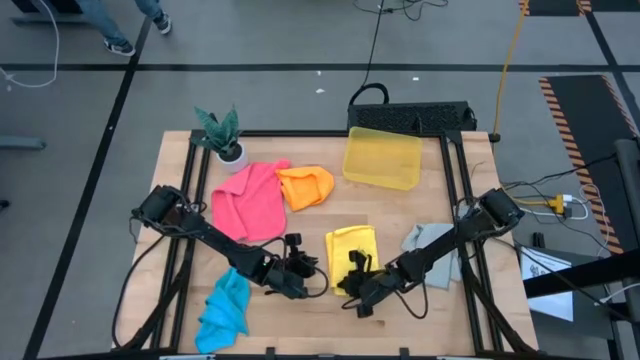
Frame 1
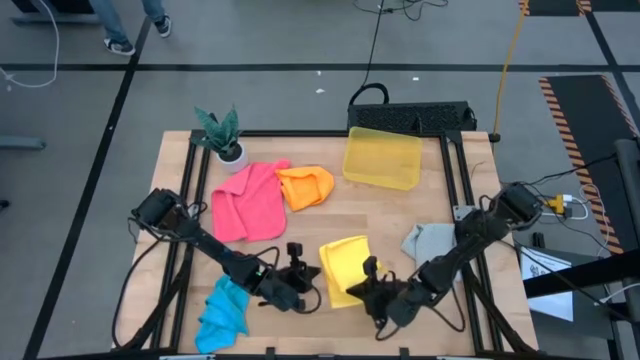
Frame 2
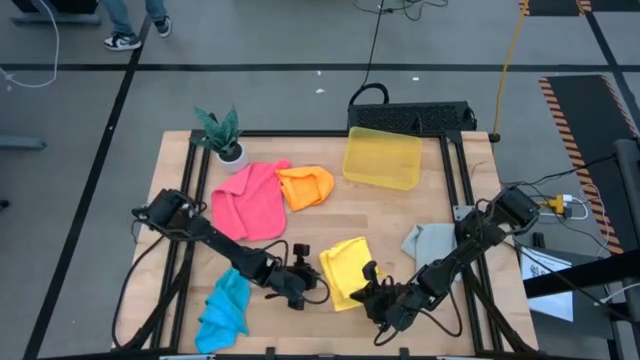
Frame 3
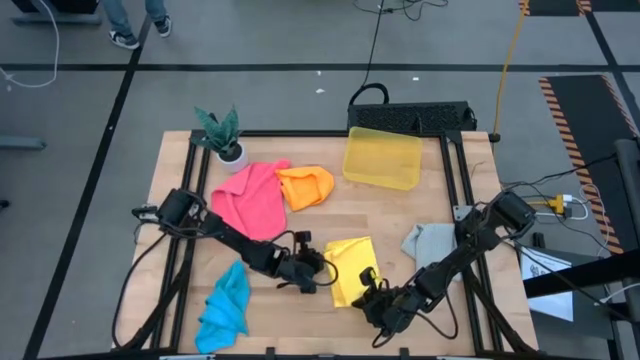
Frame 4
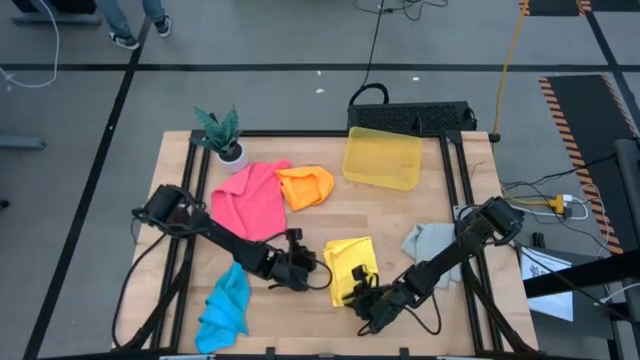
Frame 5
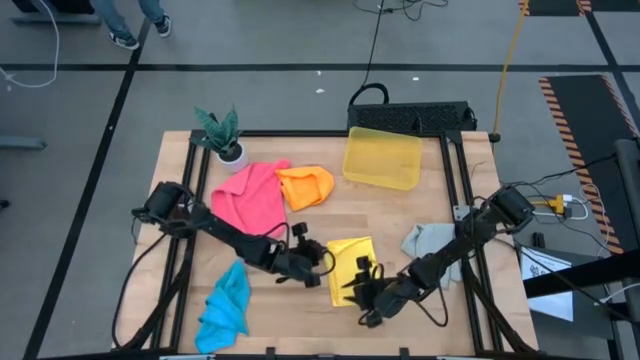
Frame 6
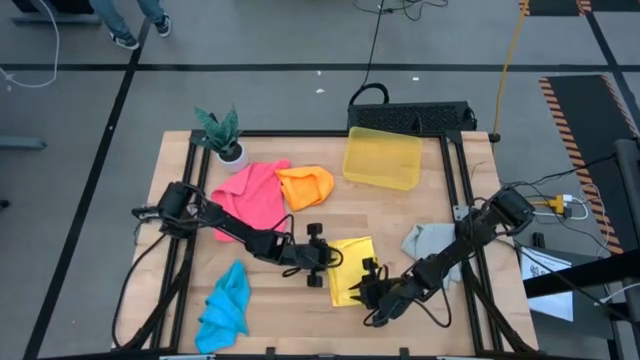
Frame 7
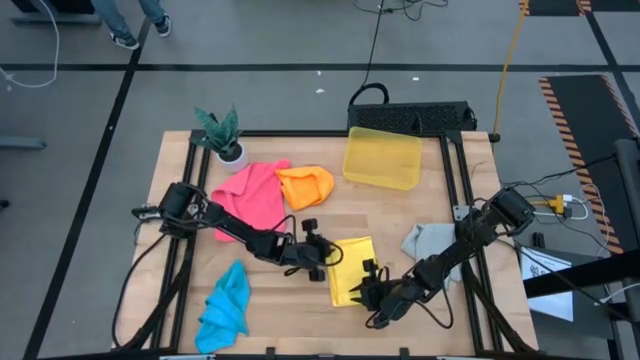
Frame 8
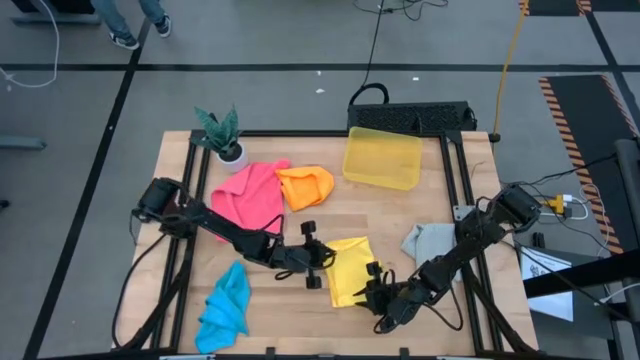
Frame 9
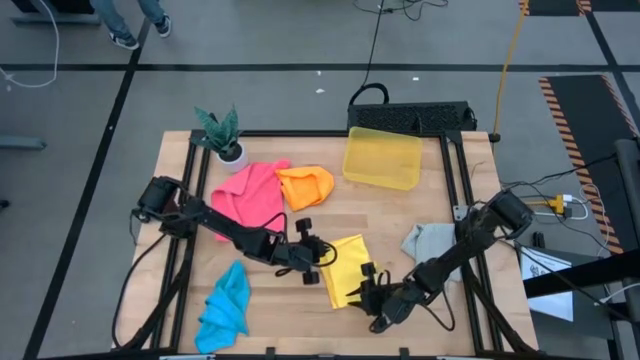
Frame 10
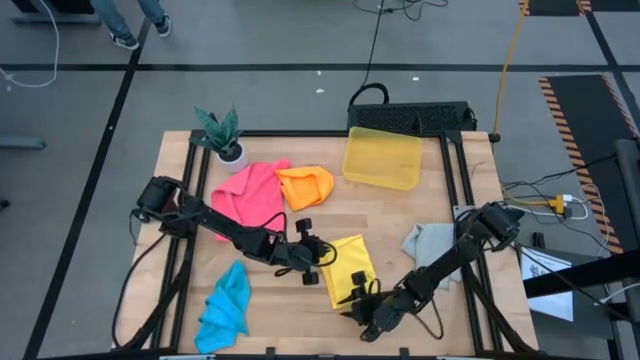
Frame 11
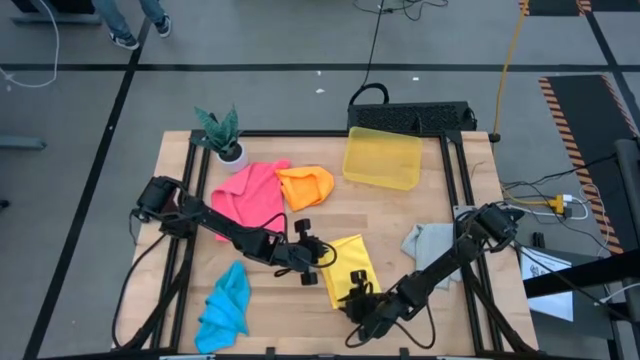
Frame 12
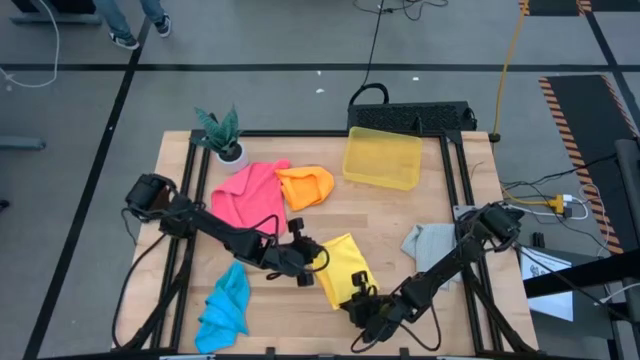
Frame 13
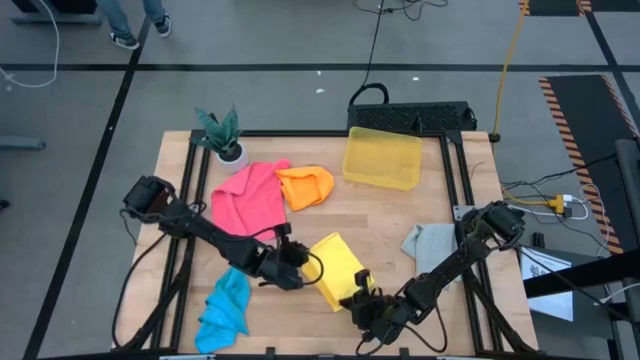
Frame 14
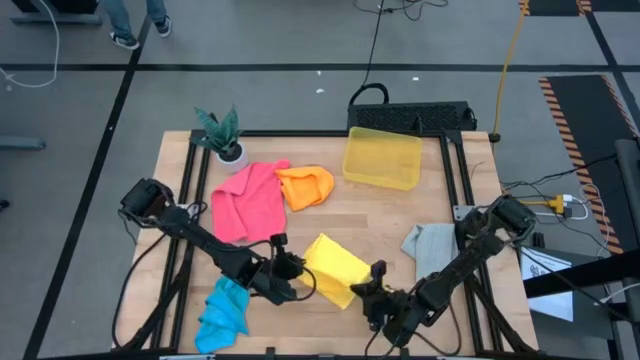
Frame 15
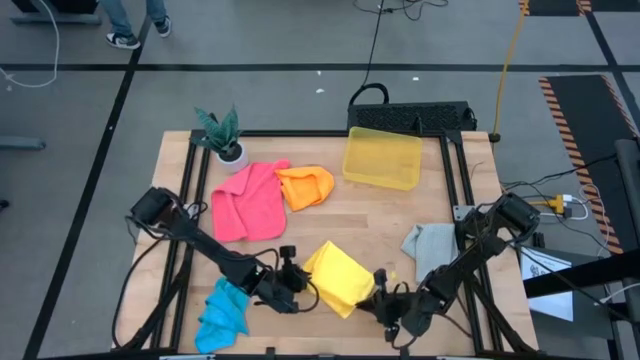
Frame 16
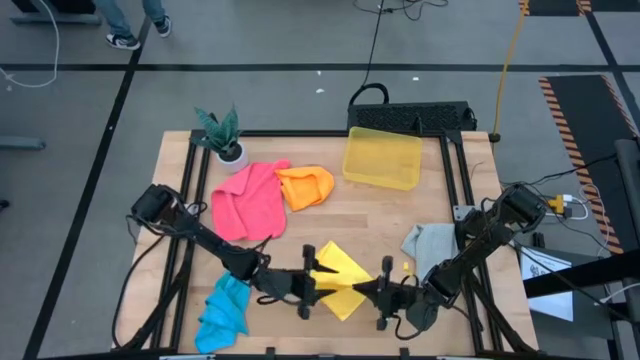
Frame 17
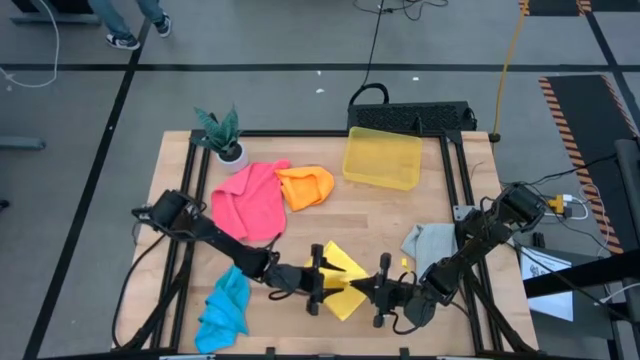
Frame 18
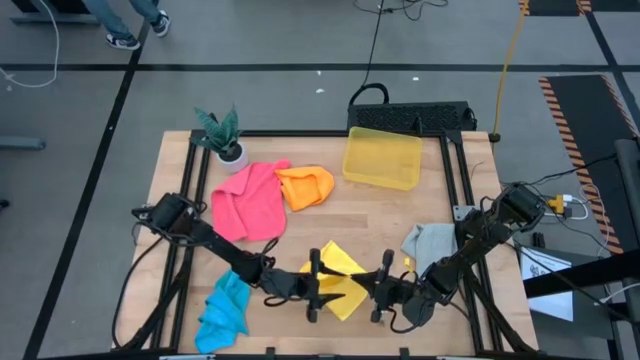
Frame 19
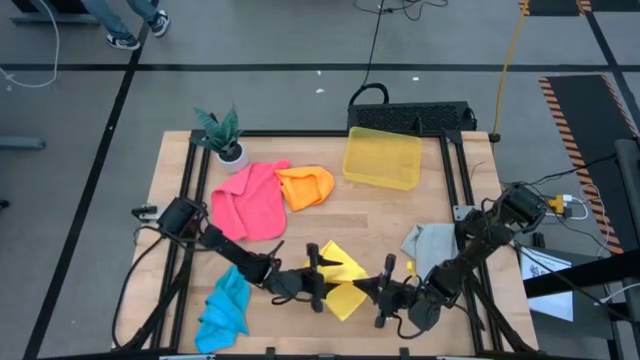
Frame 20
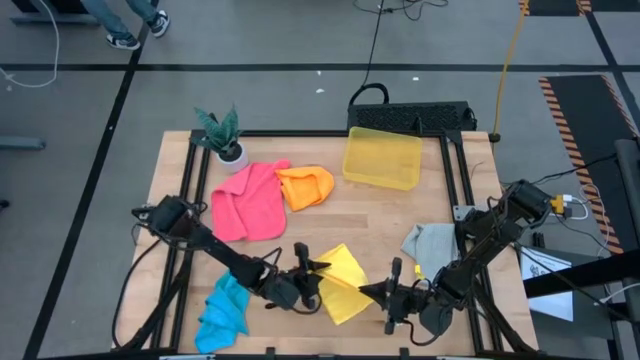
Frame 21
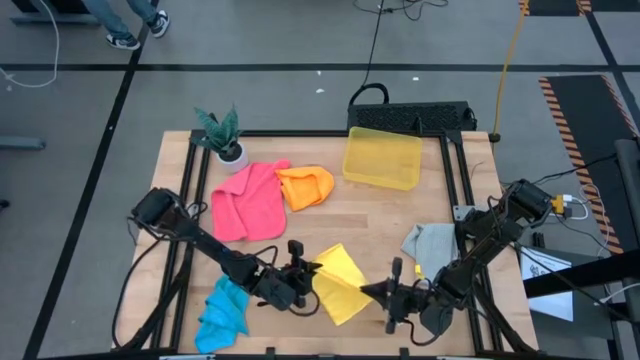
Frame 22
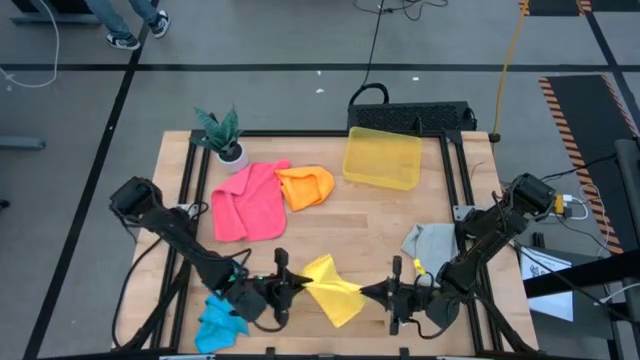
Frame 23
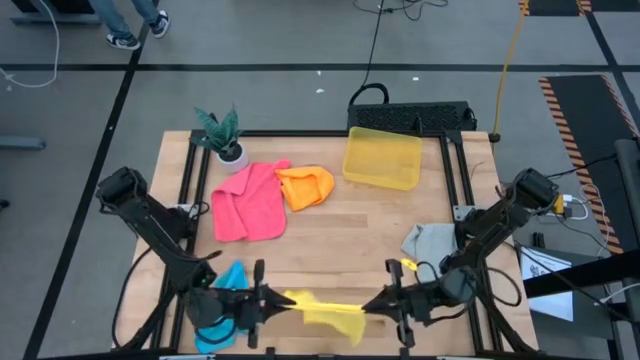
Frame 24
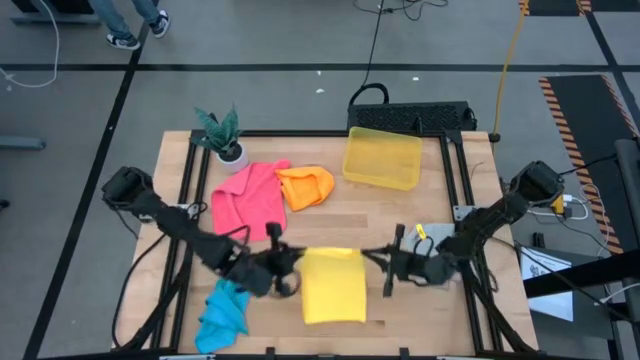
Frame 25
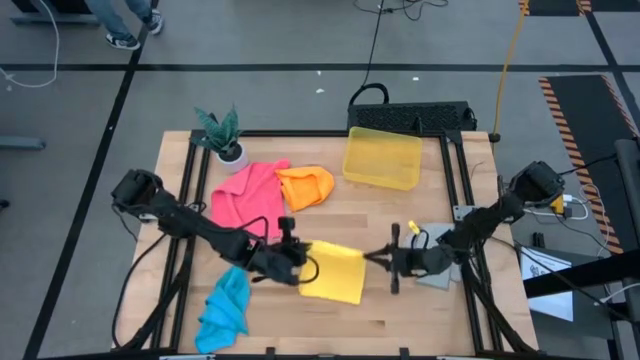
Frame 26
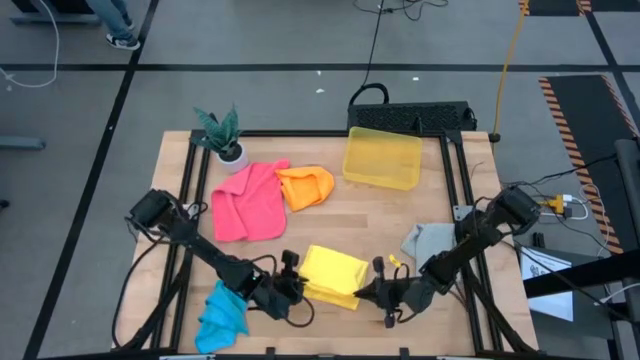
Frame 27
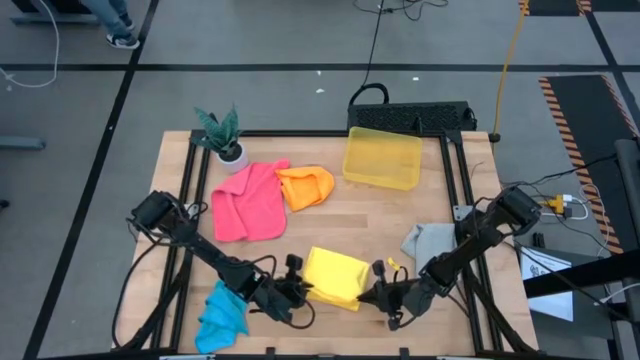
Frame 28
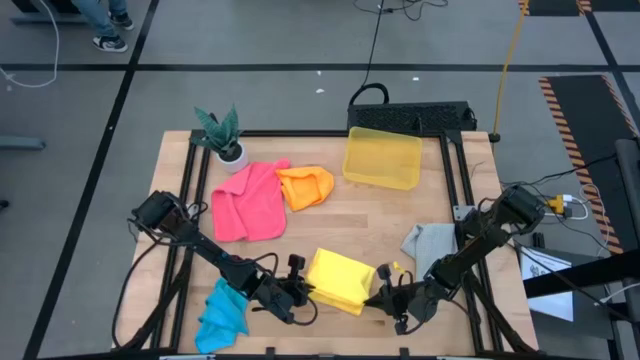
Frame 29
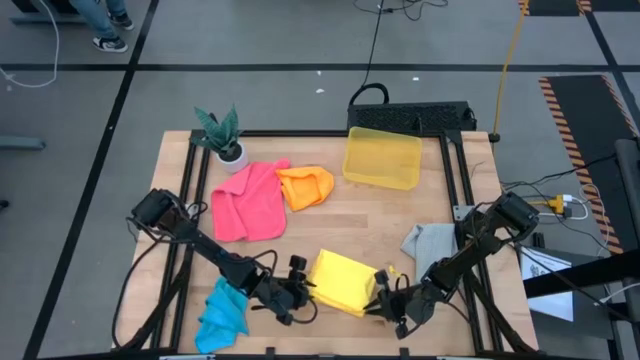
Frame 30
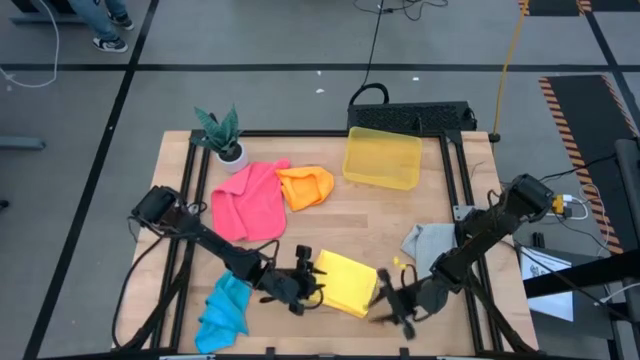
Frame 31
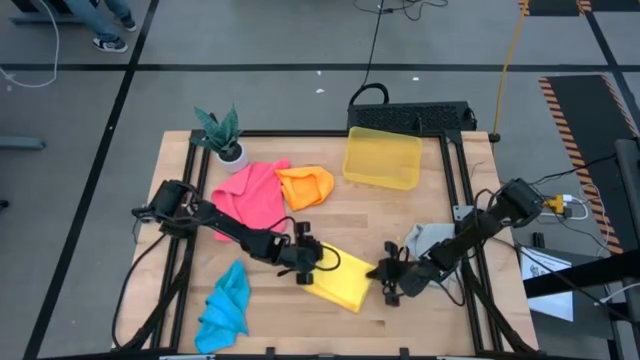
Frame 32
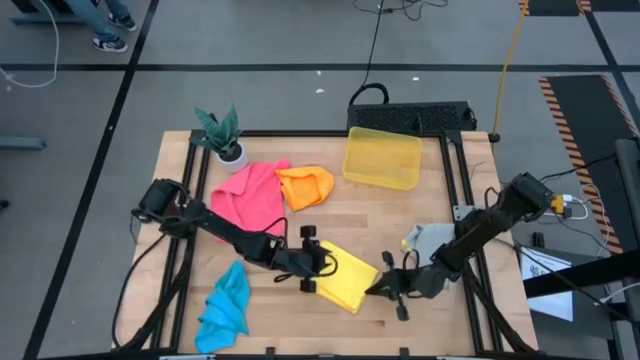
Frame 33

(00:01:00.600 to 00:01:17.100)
Task: Fold microfiber towels
Fold the yellow kitchen towel
